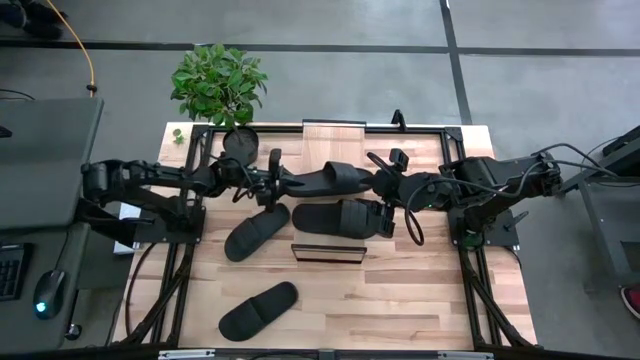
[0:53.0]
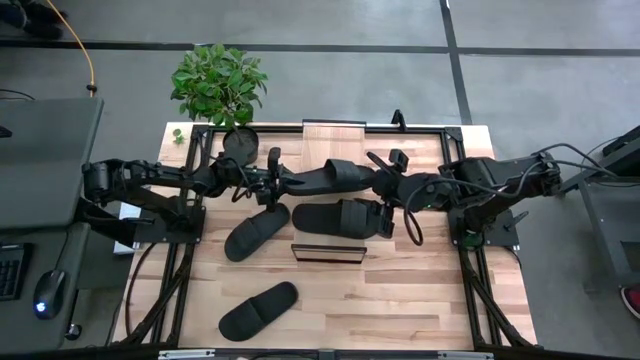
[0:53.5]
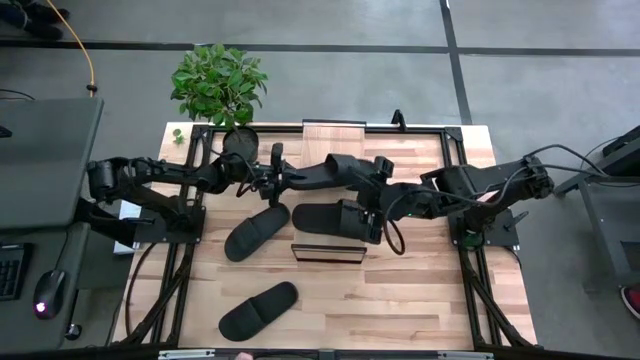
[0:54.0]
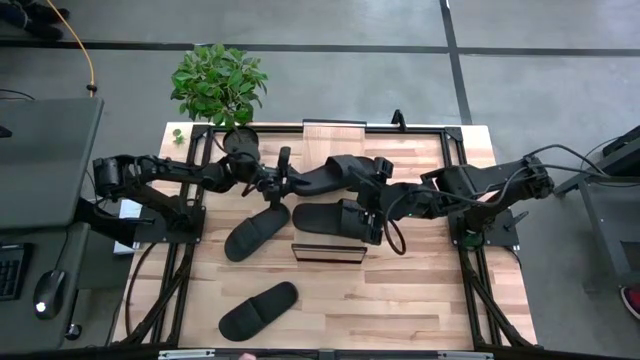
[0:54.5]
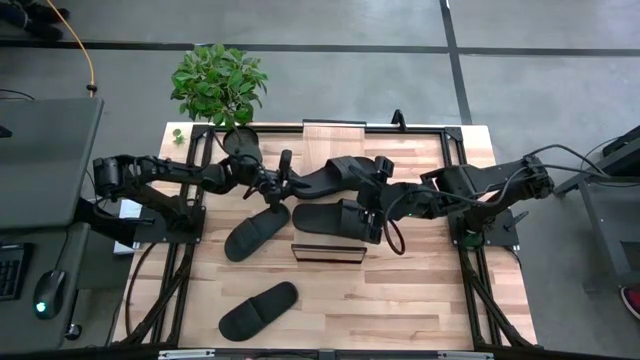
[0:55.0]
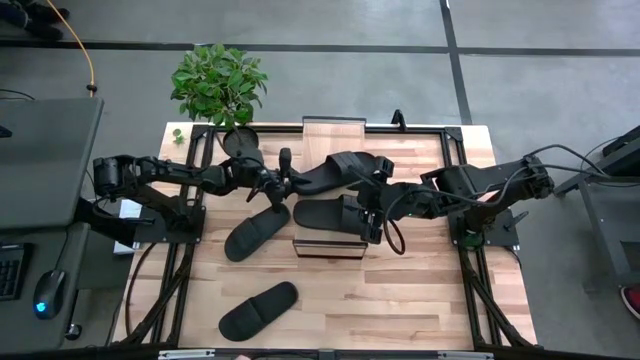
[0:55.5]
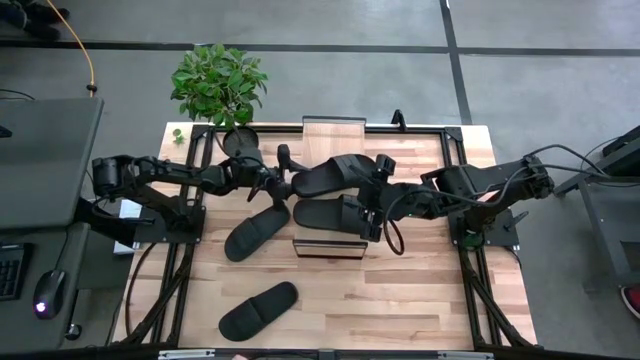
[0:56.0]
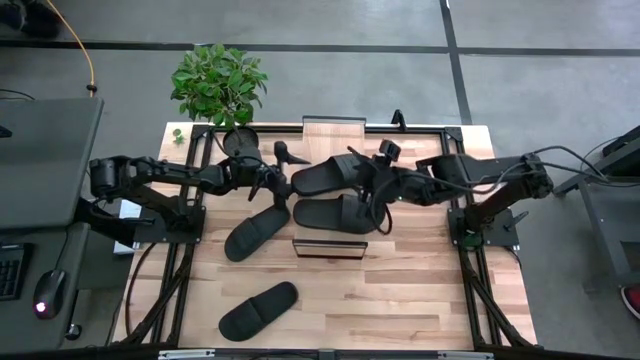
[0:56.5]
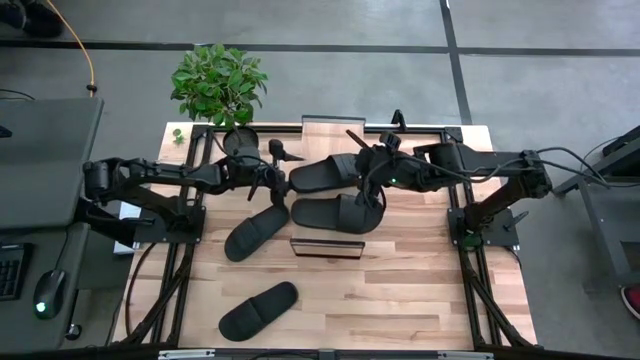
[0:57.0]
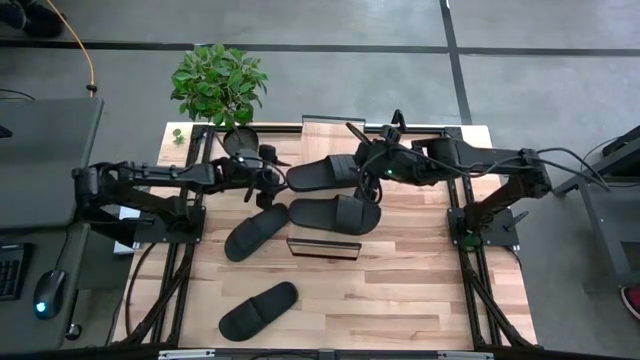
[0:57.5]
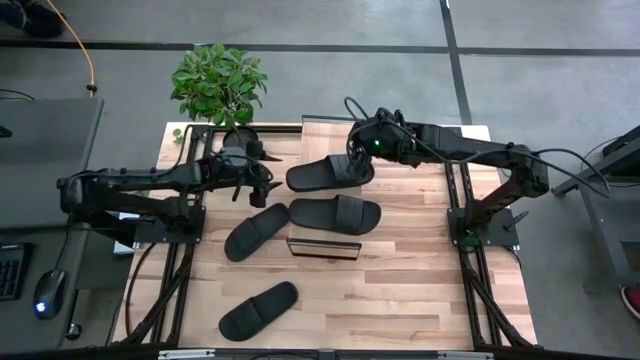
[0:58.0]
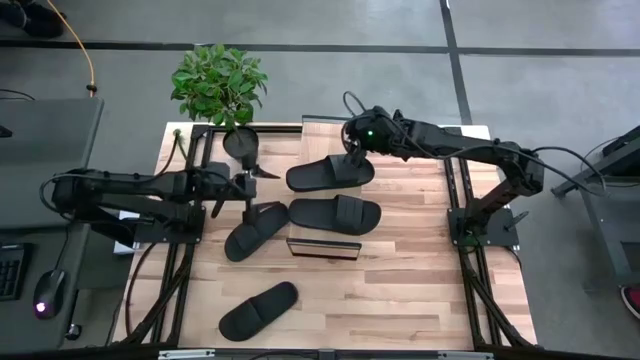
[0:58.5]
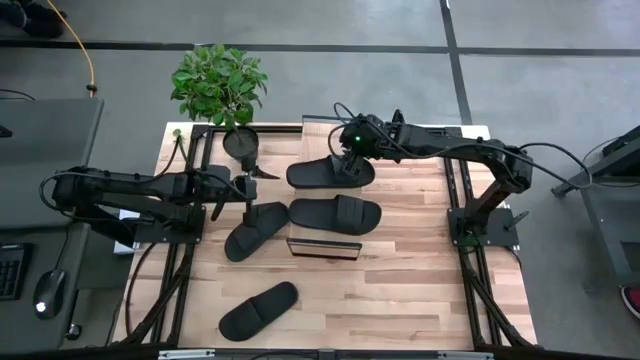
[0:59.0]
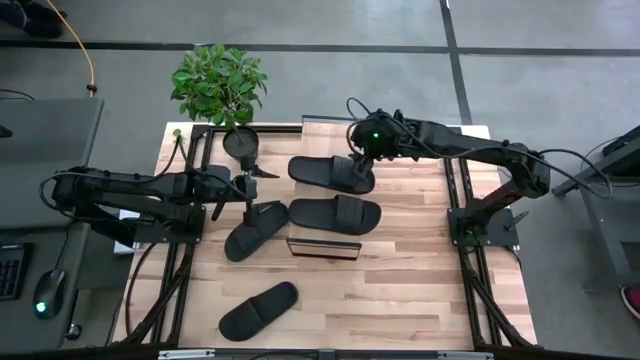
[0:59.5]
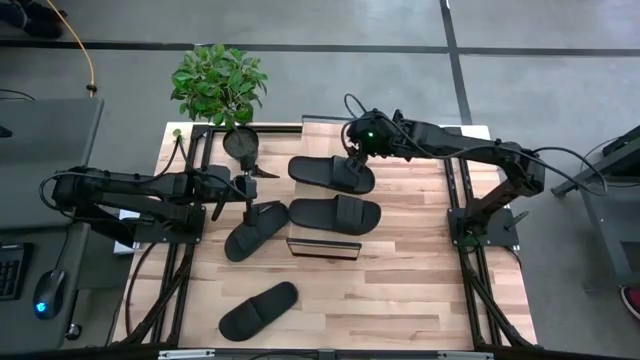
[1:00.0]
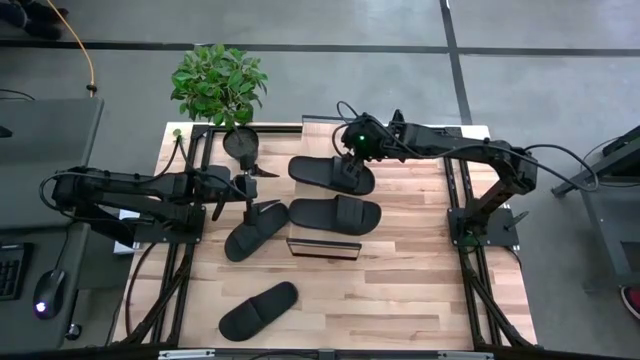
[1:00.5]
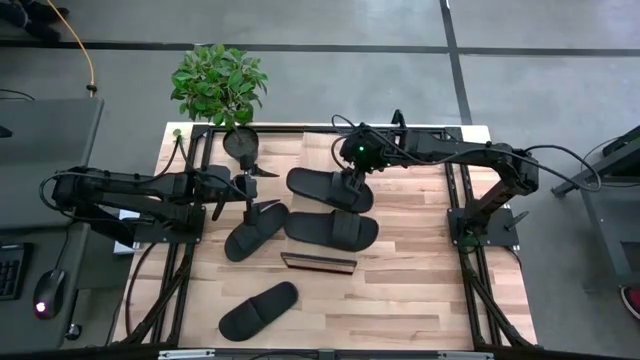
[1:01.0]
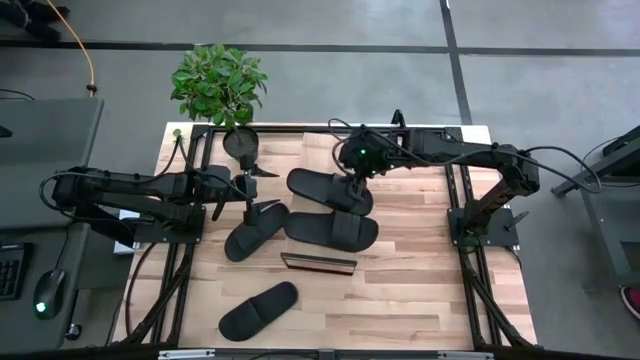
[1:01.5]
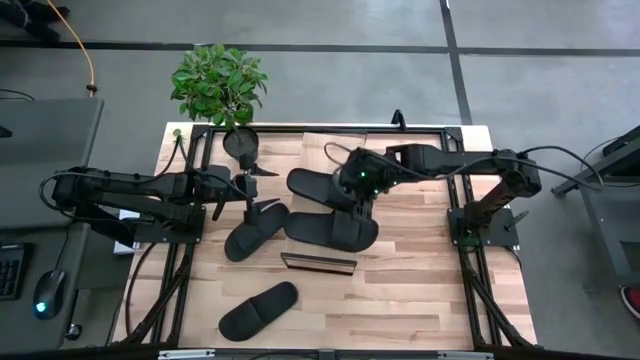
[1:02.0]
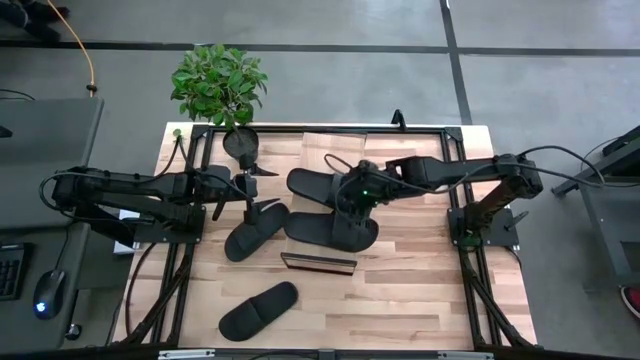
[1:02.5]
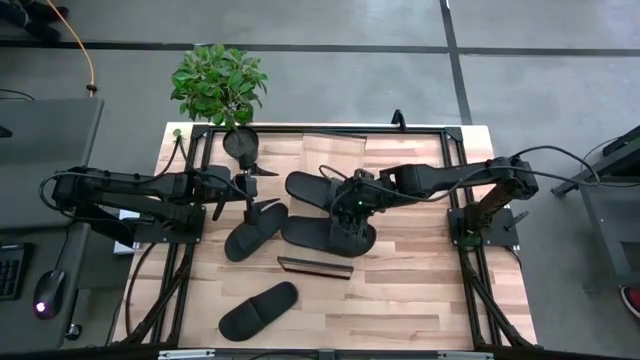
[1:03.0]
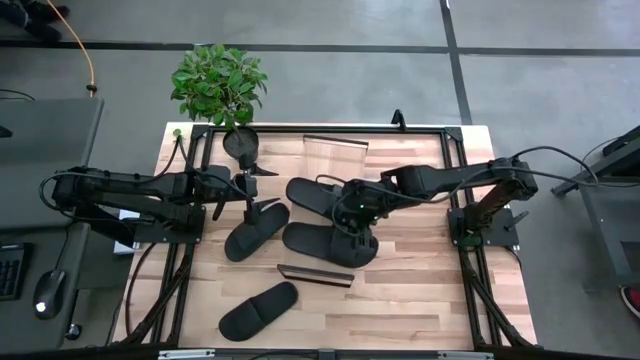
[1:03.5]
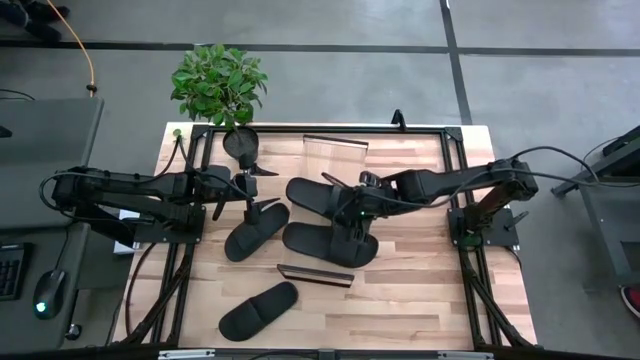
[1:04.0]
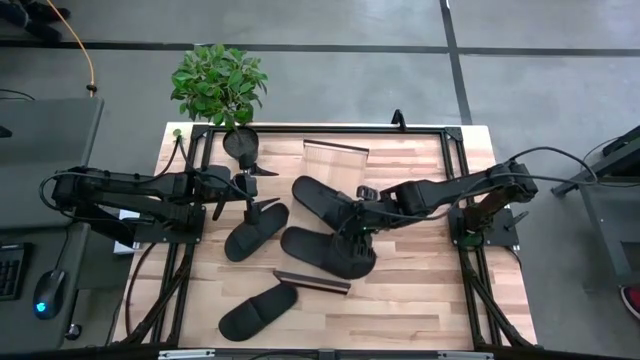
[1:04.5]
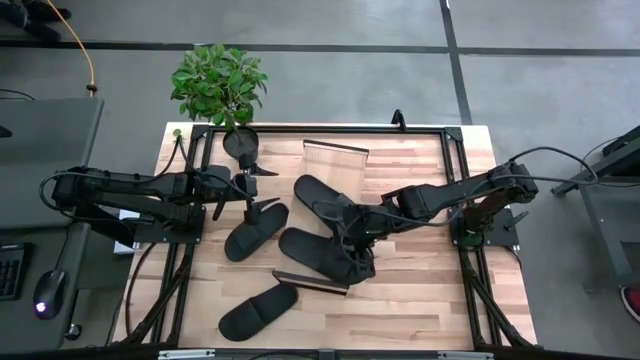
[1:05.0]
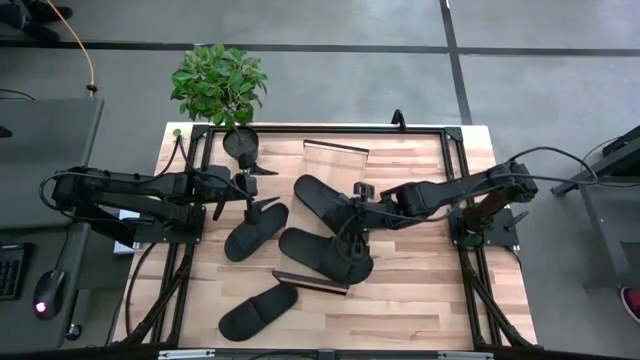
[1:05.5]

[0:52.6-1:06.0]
Task: Pick and place slides into the shelf
Put the black slide on the shelf

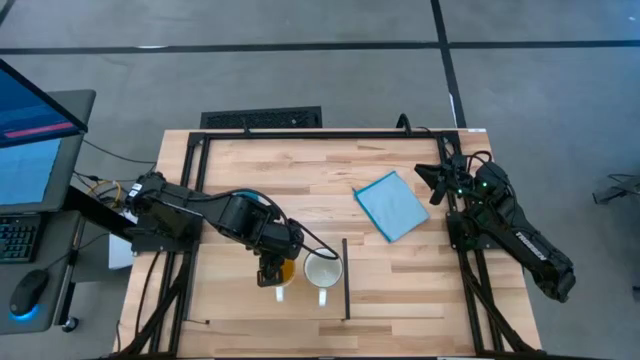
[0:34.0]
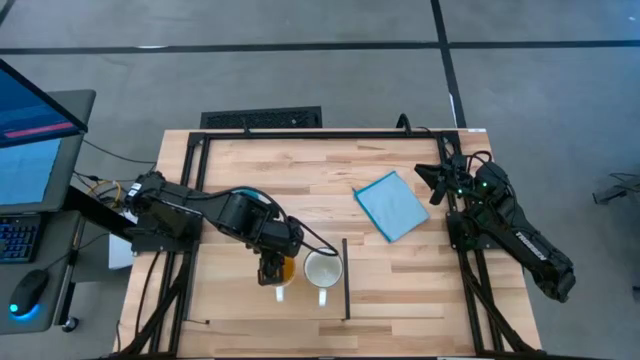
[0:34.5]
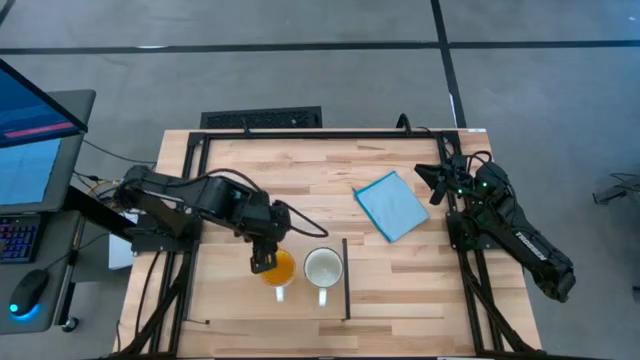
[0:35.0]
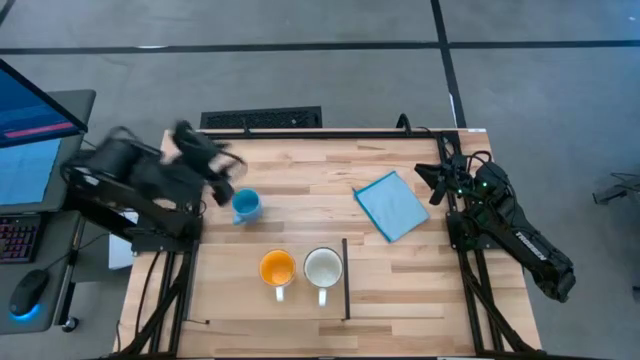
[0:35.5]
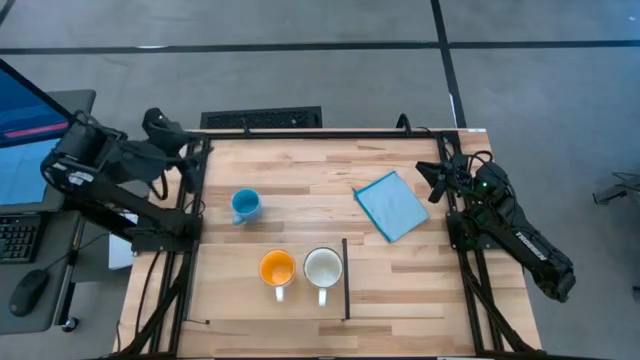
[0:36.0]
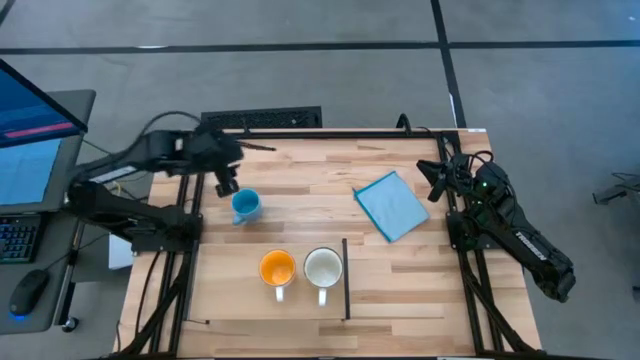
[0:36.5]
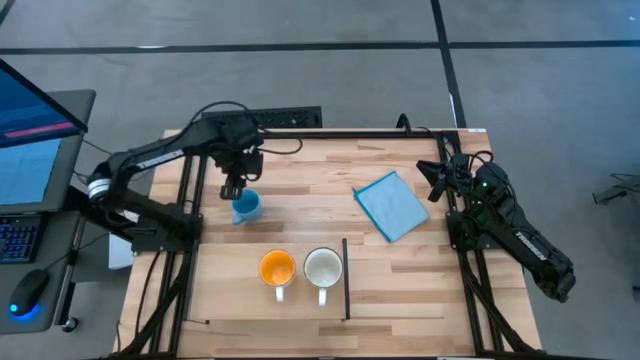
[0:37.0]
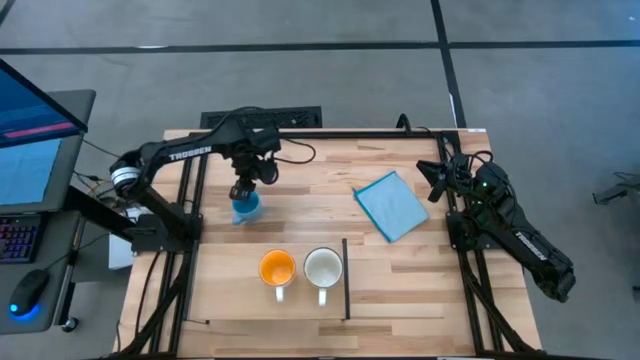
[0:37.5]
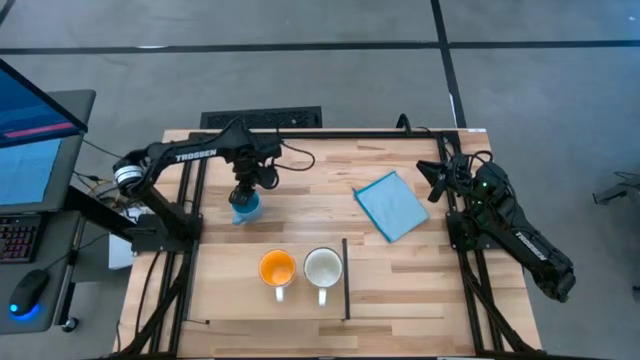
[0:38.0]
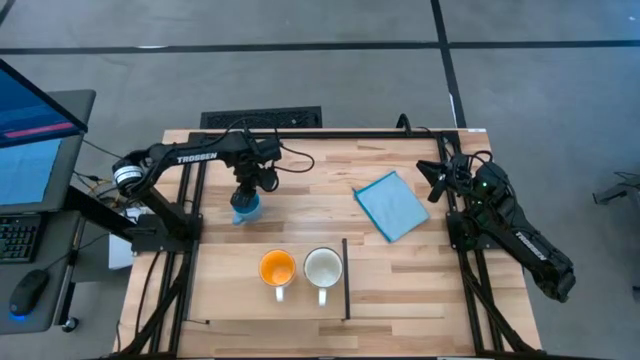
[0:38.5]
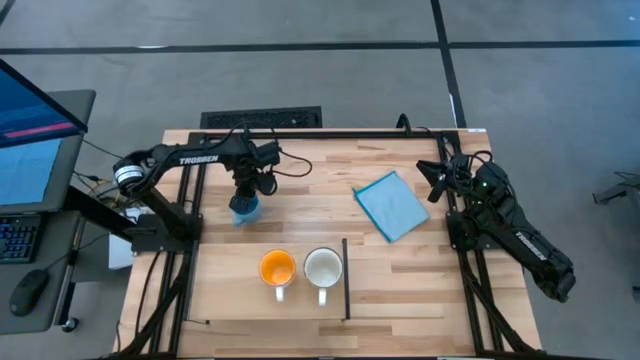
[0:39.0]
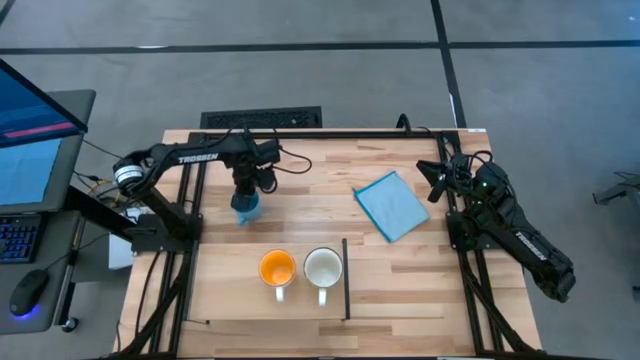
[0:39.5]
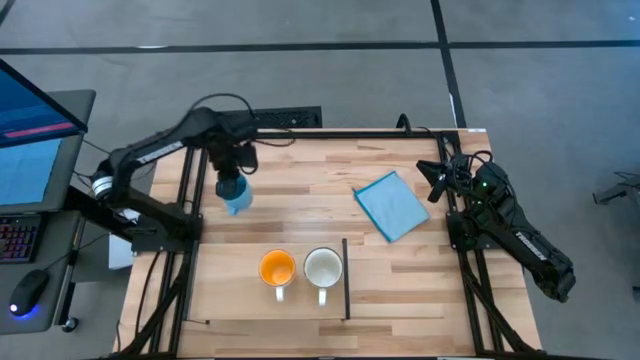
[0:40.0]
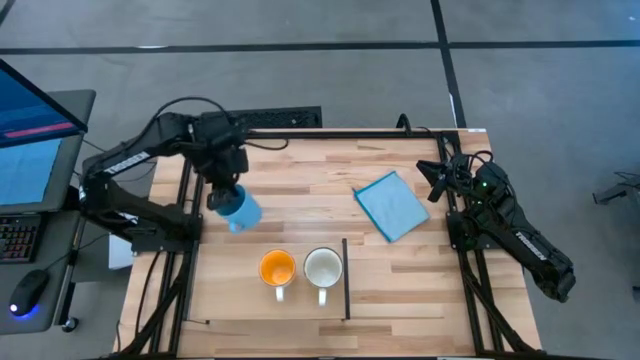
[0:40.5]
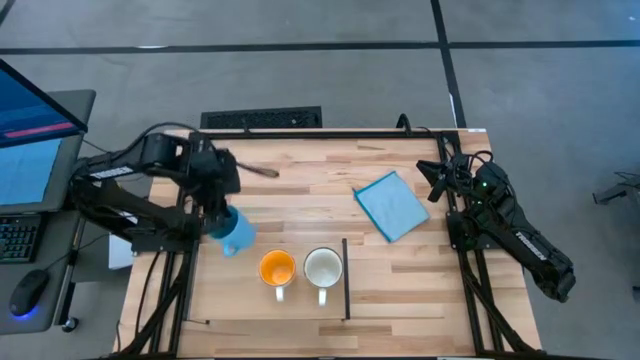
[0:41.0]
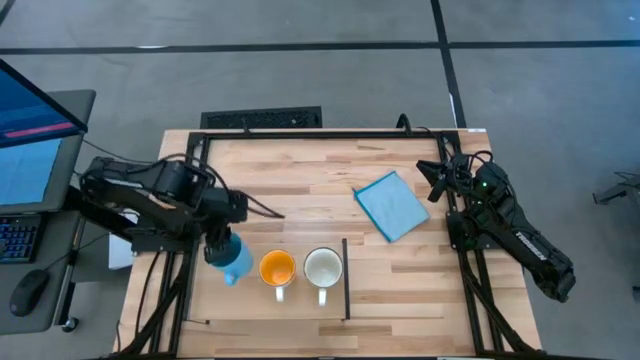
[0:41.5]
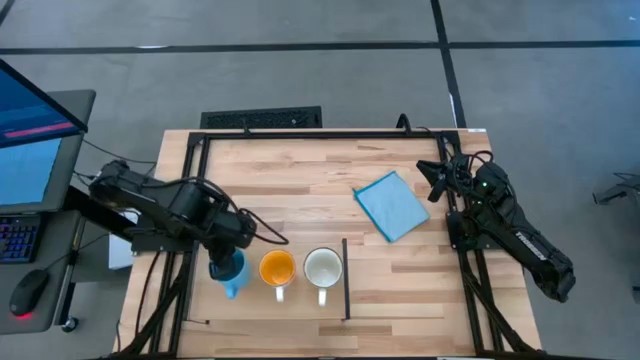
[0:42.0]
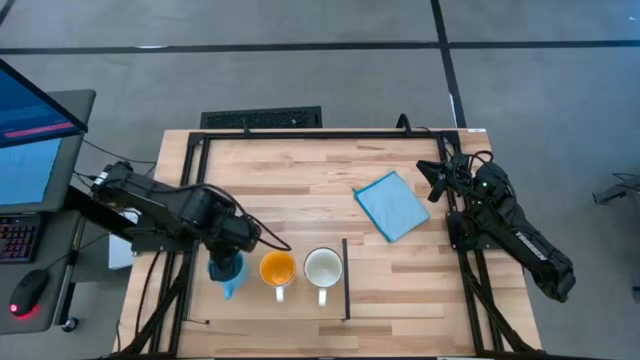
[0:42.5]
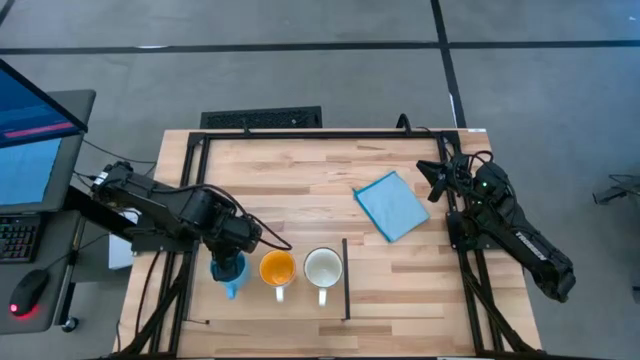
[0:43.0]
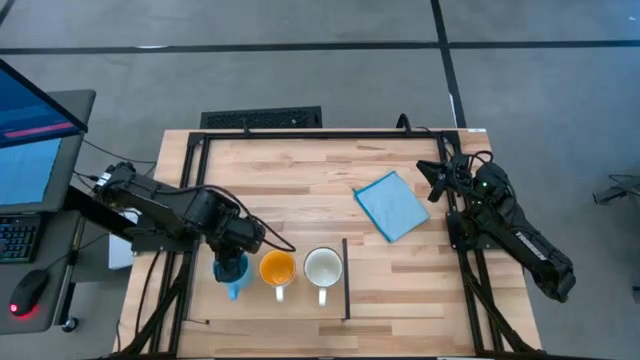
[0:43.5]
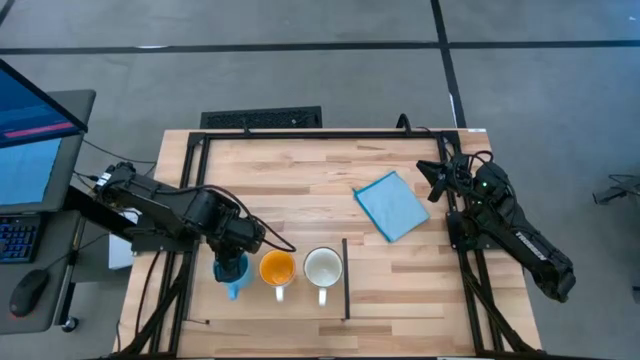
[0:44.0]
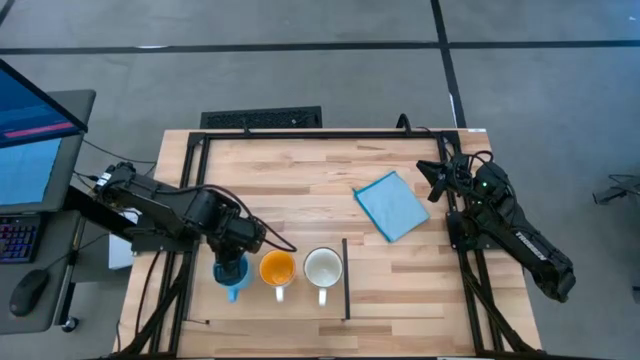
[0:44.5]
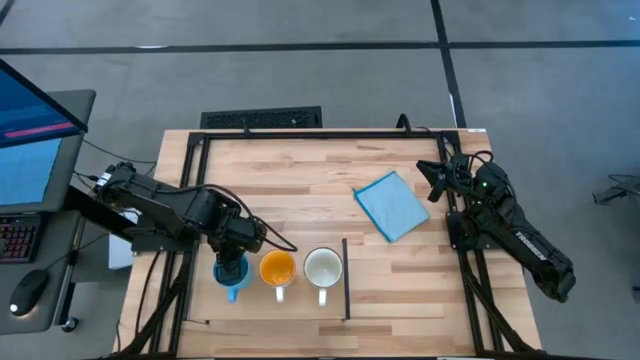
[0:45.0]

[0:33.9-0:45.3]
Task: Stack small to large cups/mugs on shelf
Put the blue mug on the shelf
